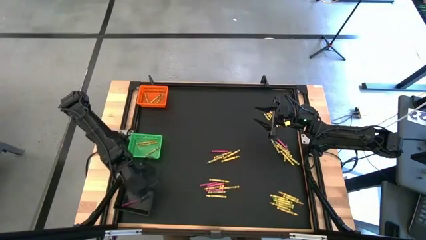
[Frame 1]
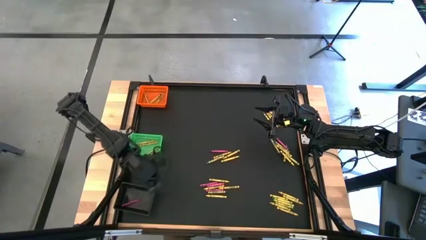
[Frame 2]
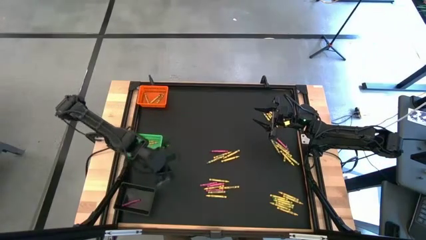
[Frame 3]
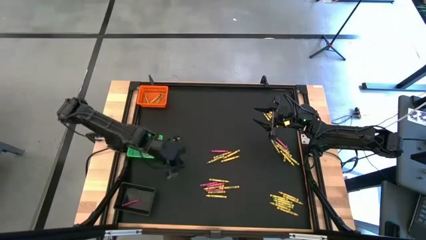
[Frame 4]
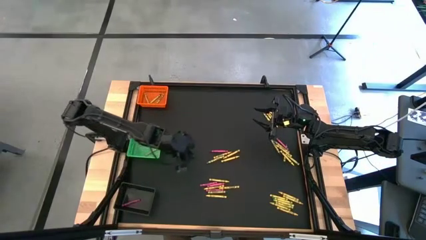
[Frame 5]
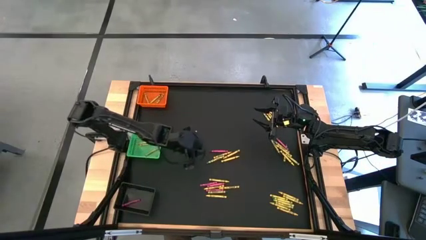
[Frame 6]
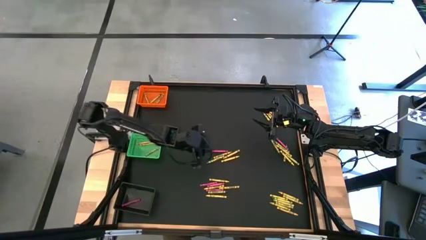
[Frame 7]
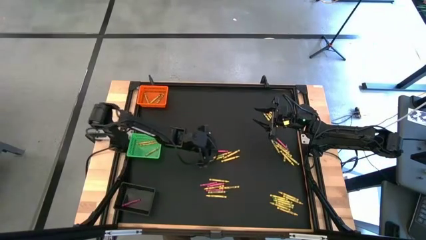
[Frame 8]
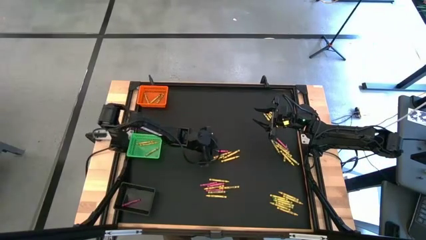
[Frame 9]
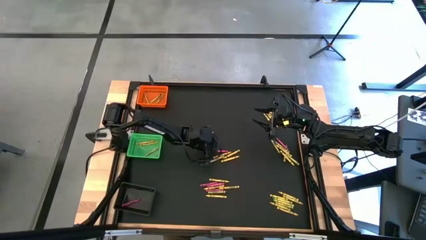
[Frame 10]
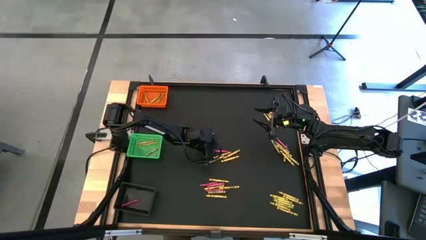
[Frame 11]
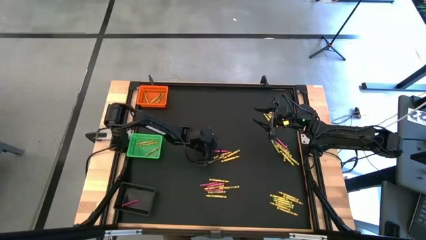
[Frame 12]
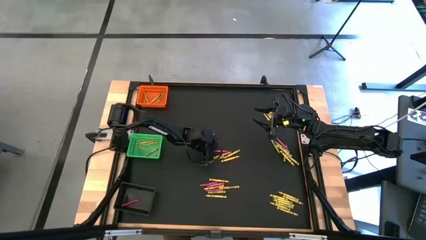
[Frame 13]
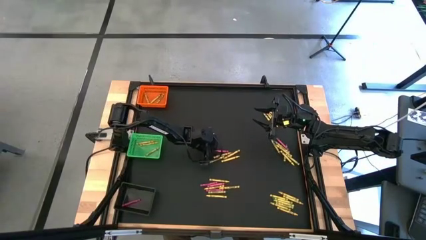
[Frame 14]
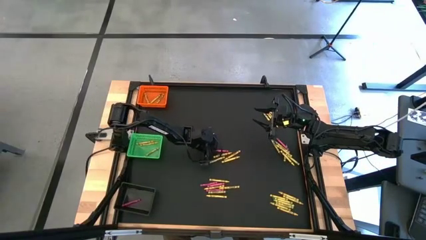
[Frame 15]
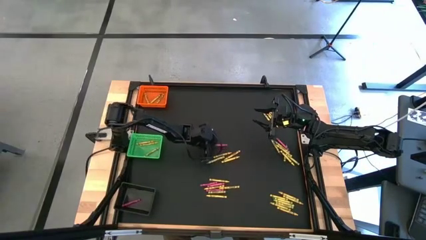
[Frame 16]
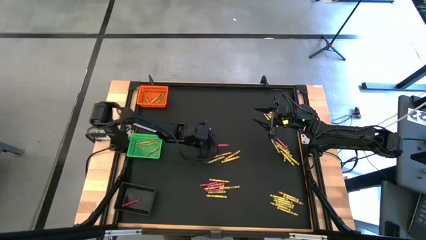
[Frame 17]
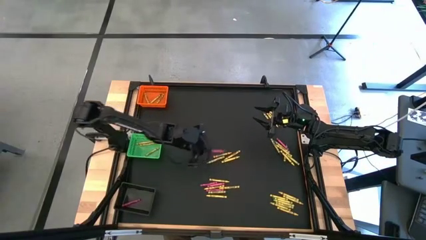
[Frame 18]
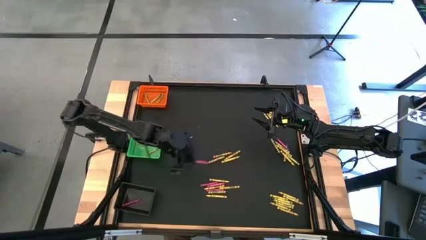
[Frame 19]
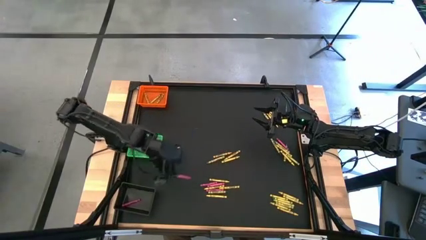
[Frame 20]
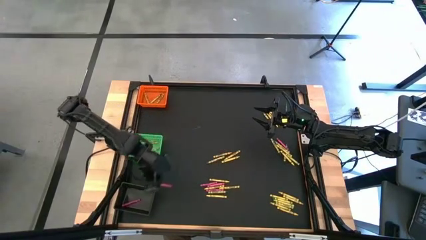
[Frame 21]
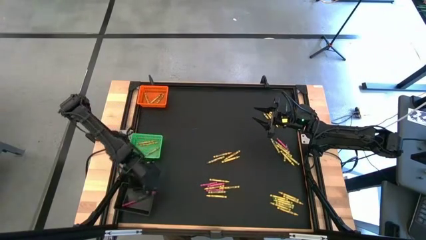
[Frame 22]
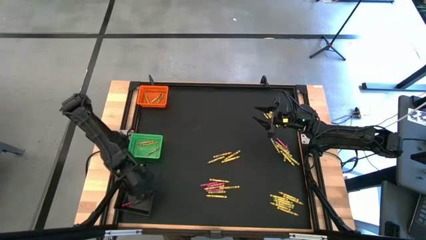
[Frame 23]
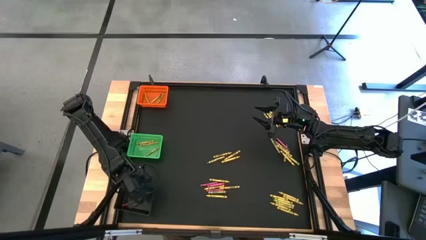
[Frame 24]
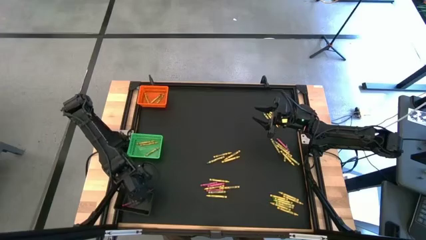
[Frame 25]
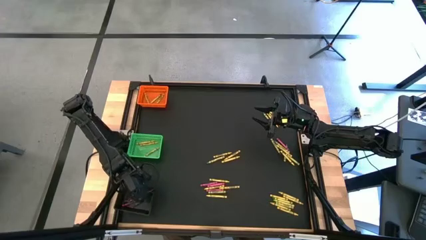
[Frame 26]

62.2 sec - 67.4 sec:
Task: Sort crayons
Put the pink crayon into the black bin

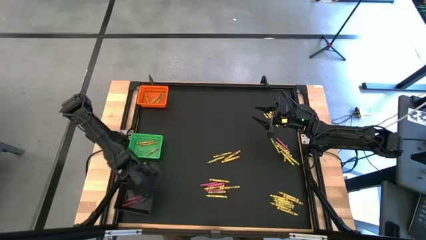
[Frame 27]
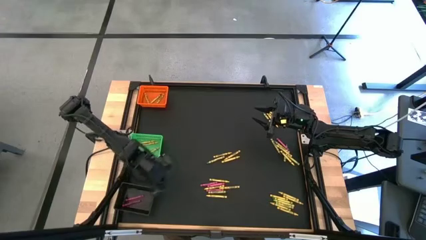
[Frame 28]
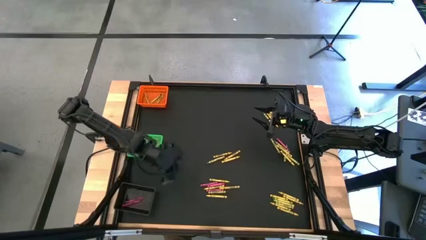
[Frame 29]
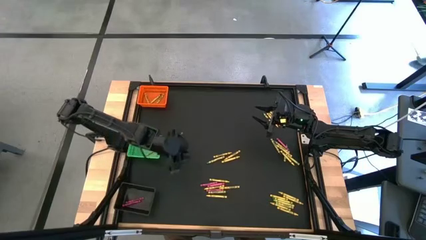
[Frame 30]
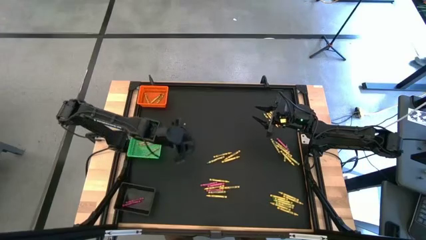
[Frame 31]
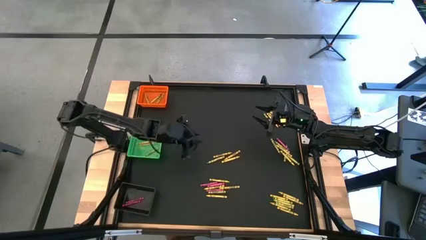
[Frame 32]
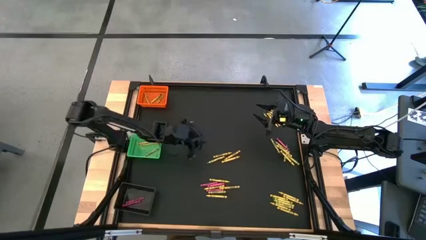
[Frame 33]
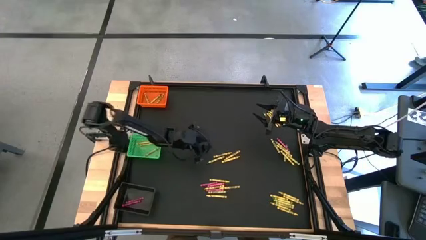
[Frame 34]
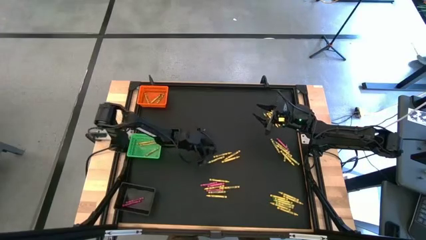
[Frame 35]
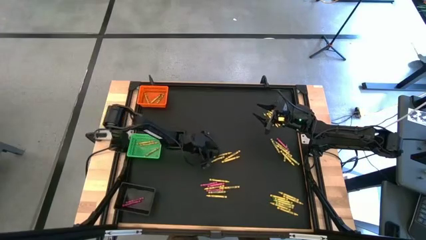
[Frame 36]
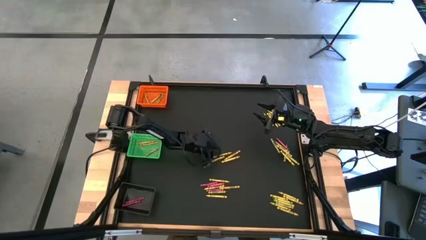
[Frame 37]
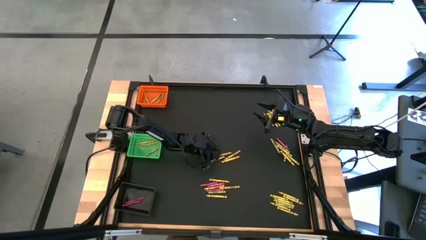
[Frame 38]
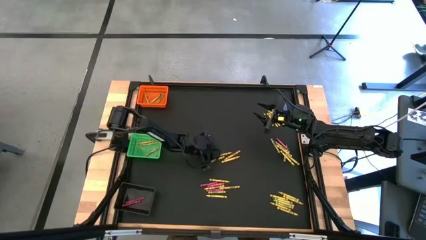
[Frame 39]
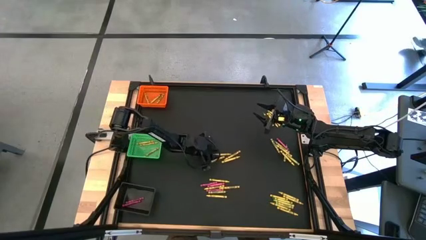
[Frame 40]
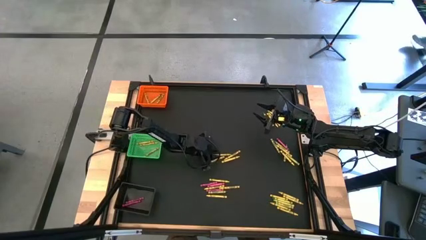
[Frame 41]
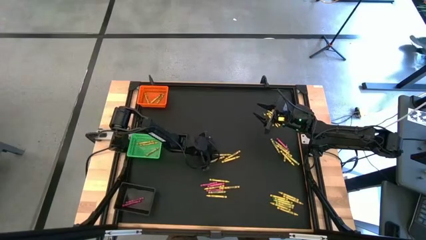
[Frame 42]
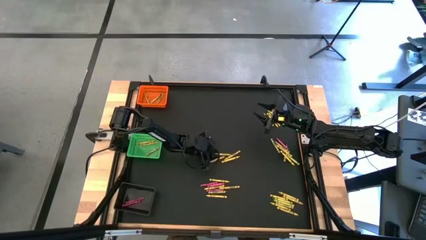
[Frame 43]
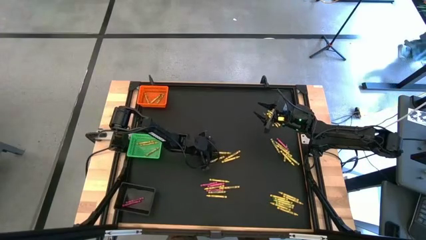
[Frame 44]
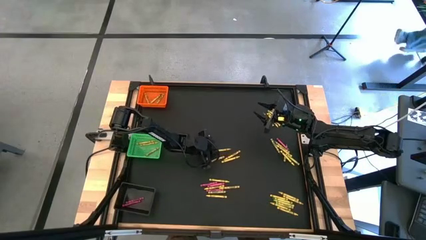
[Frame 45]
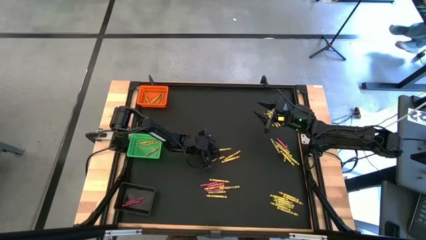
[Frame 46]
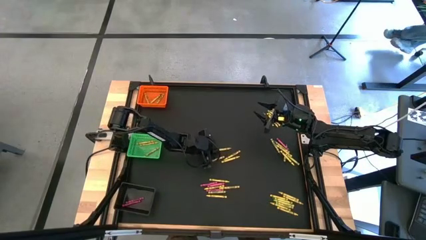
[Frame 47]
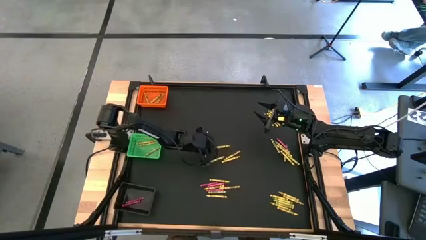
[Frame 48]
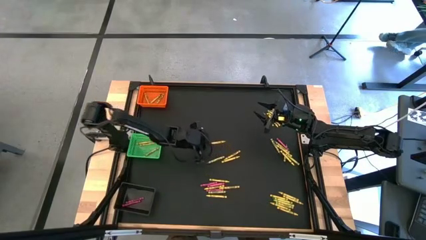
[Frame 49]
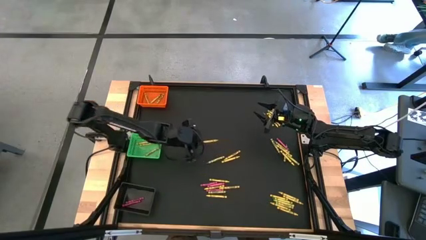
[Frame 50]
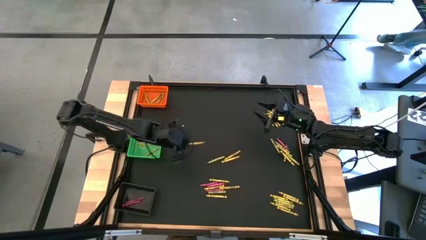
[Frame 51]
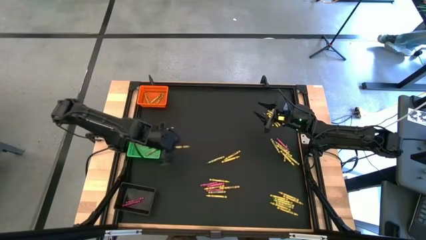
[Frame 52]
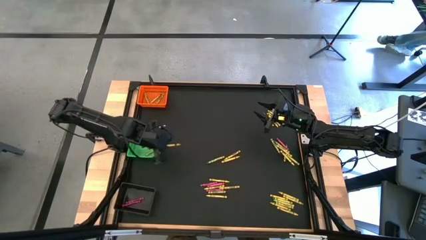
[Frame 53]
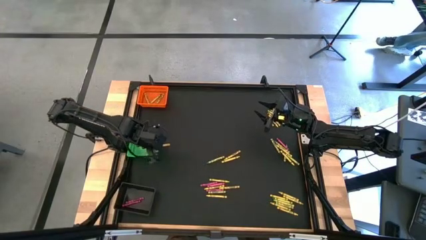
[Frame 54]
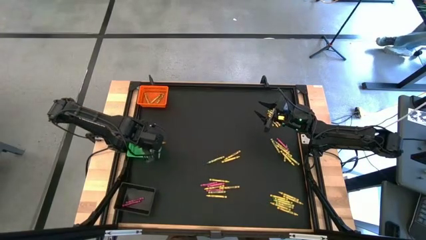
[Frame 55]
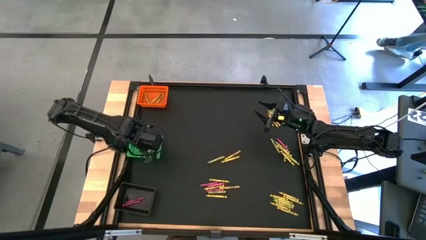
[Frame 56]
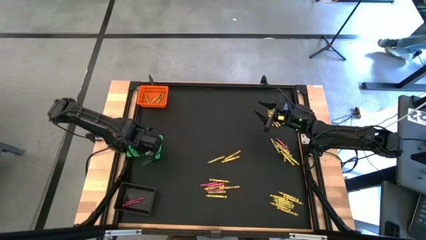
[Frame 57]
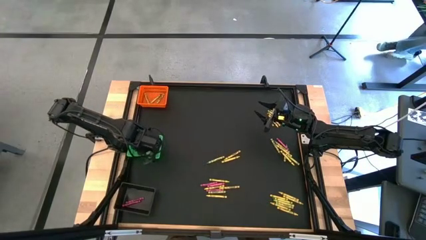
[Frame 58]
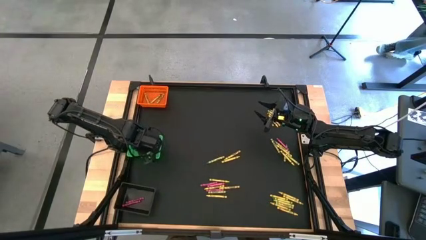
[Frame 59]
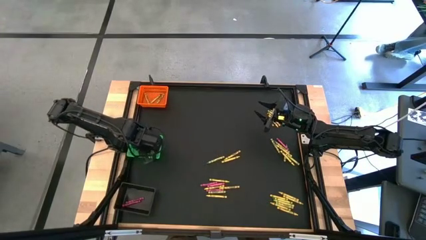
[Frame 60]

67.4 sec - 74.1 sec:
Put the yellow crayon into the green bin

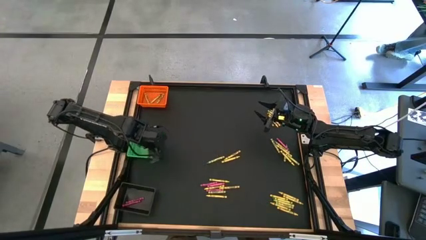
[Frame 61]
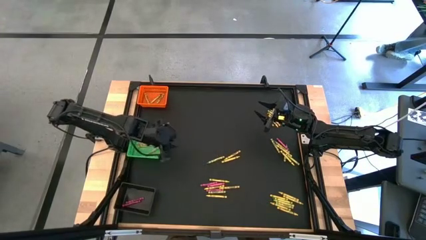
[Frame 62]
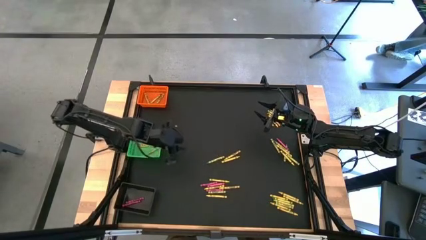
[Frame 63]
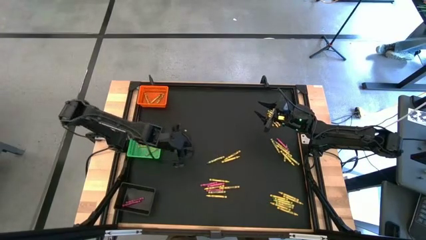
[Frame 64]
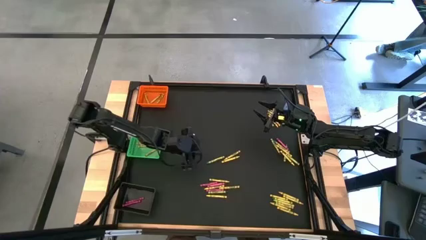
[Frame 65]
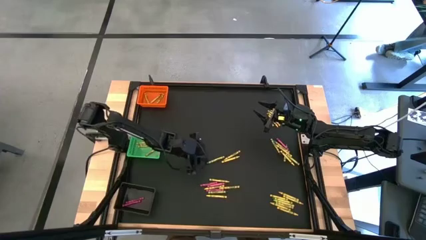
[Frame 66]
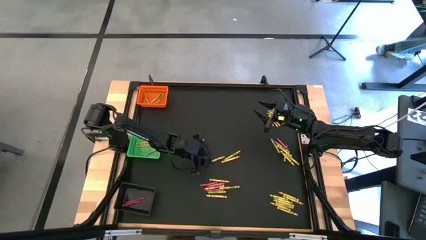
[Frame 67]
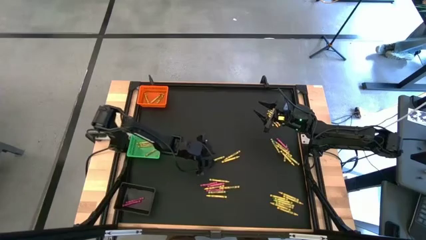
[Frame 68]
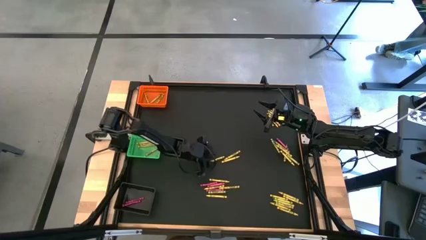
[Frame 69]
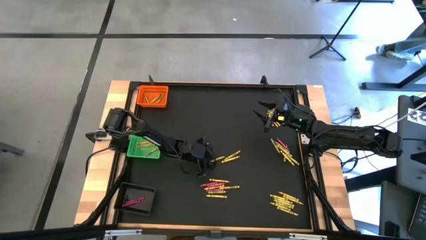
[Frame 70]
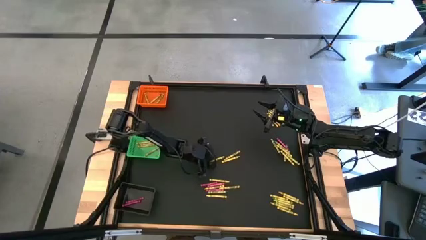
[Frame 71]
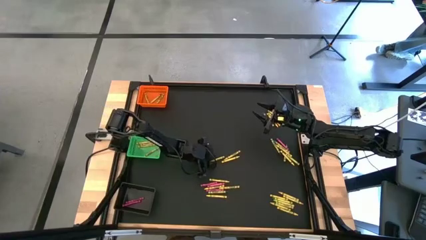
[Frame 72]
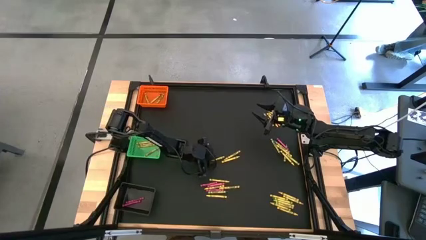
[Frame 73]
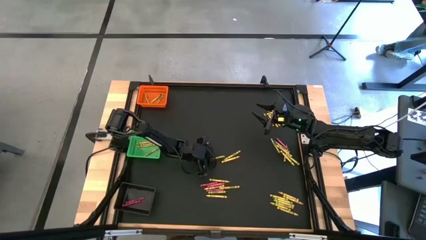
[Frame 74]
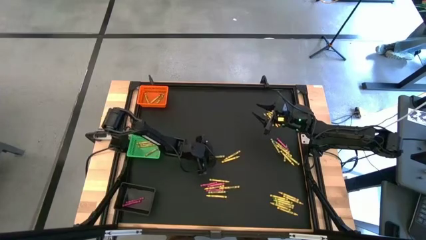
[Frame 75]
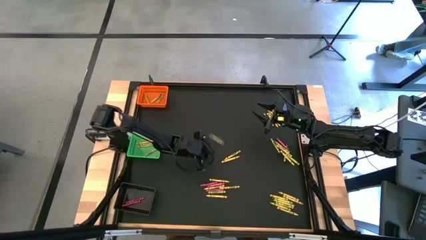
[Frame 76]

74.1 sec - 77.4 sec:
Put the green crayon into the orange bin

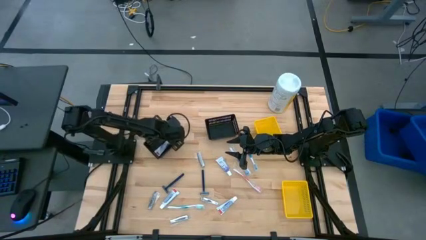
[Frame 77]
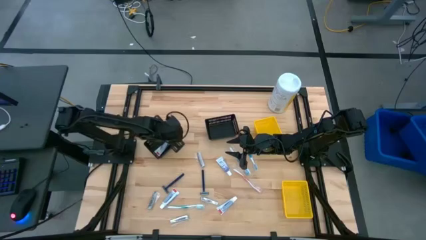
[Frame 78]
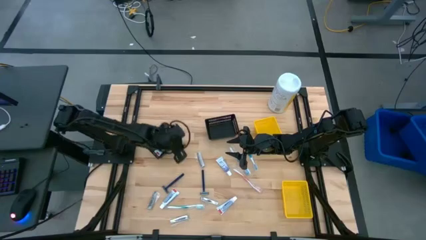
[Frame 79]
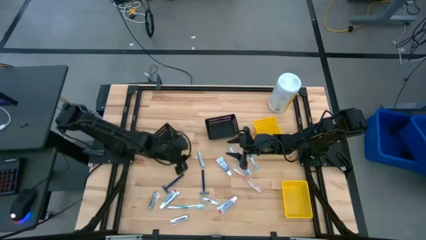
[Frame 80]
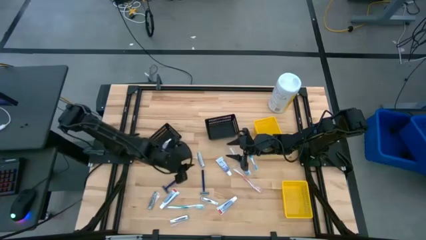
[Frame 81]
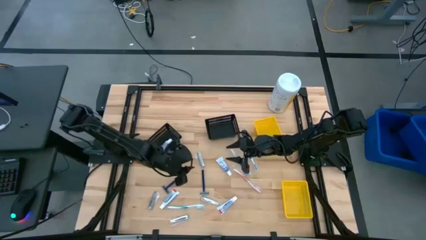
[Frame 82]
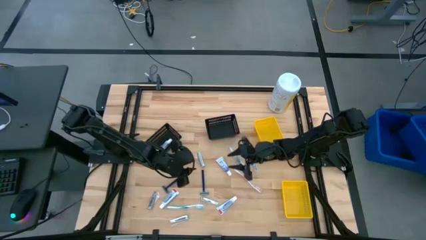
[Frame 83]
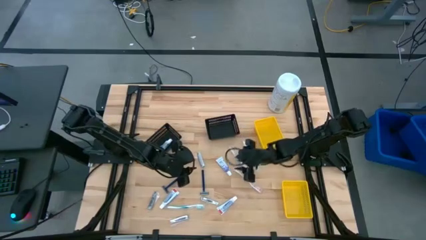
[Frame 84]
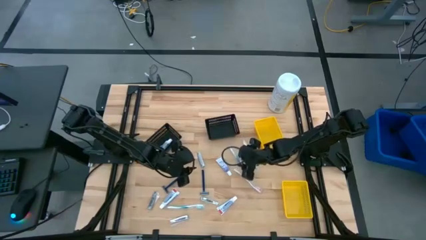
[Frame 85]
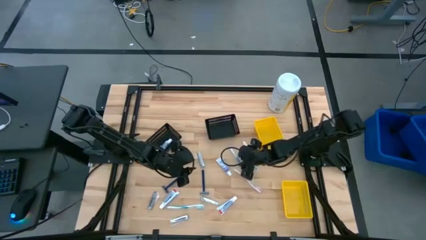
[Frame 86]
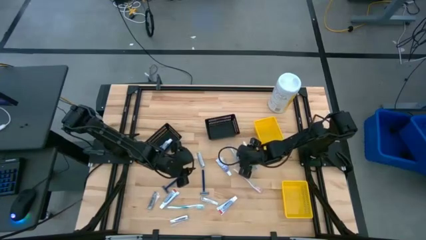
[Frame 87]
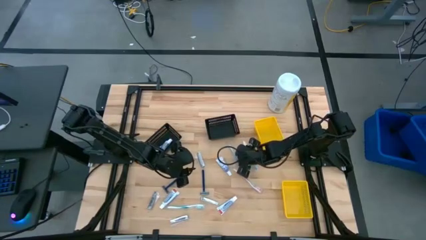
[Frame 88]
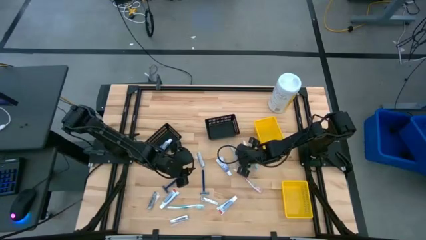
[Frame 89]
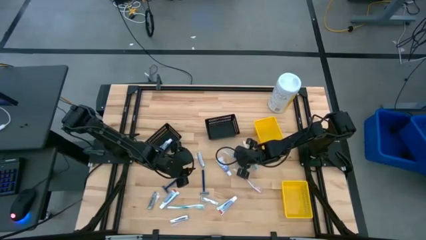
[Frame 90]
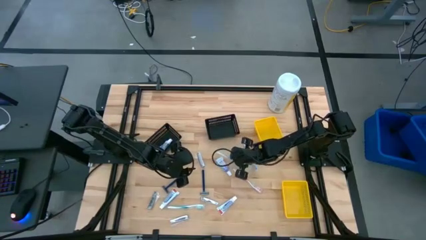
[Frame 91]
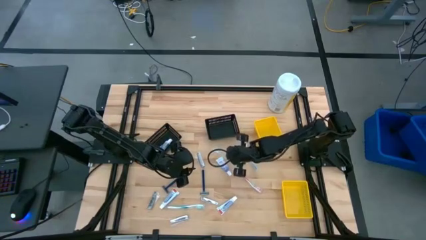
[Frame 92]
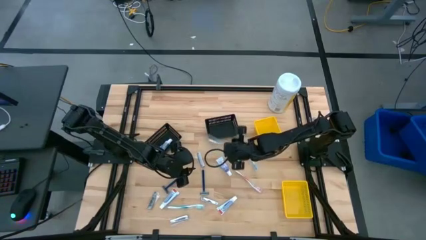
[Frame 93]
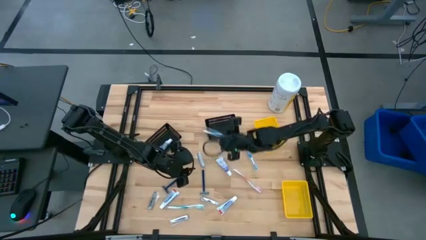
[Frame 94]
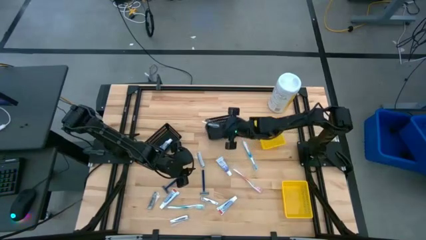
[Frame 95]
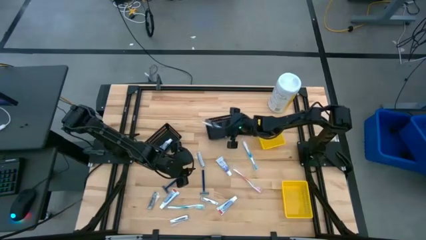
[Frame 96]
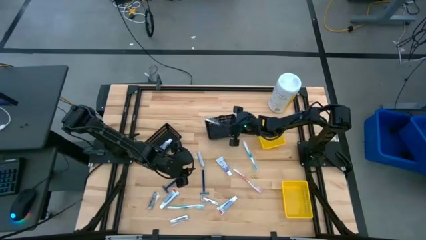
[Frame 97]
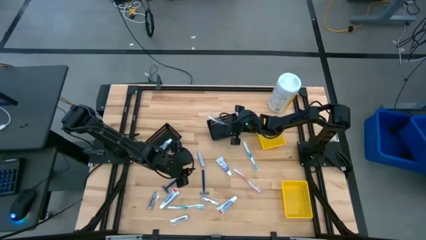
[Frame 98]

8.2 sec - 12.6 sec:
Task: Pick & Place Travel size toiletries
Put the blue toothbrush into the top black basket
